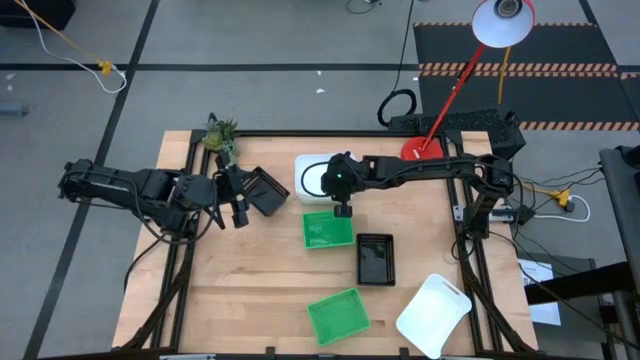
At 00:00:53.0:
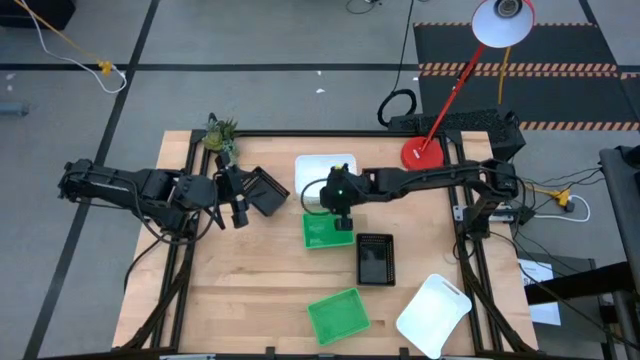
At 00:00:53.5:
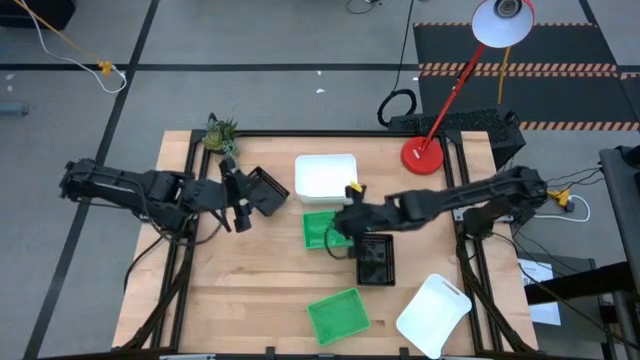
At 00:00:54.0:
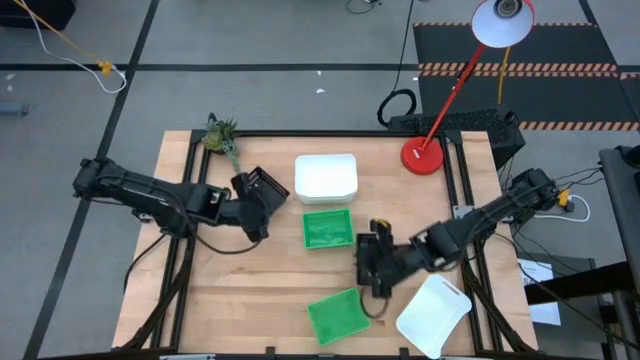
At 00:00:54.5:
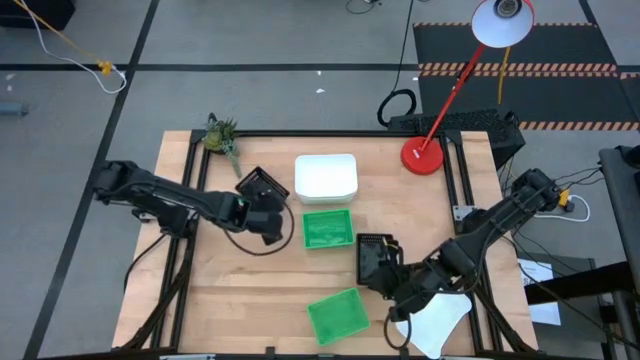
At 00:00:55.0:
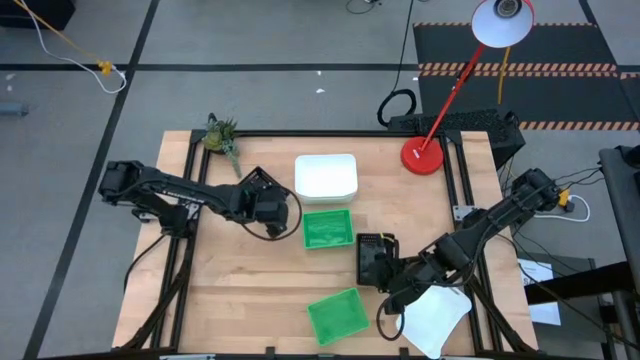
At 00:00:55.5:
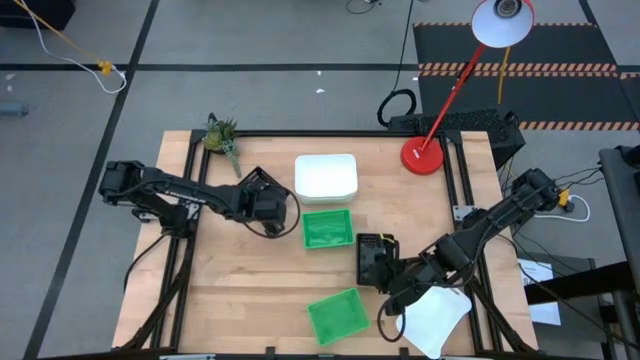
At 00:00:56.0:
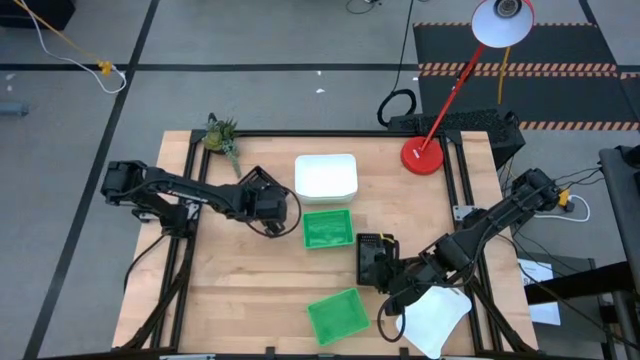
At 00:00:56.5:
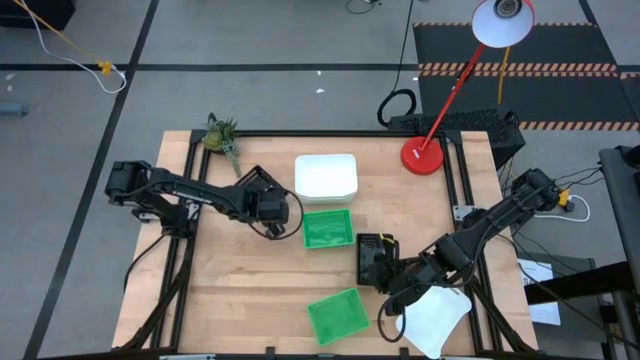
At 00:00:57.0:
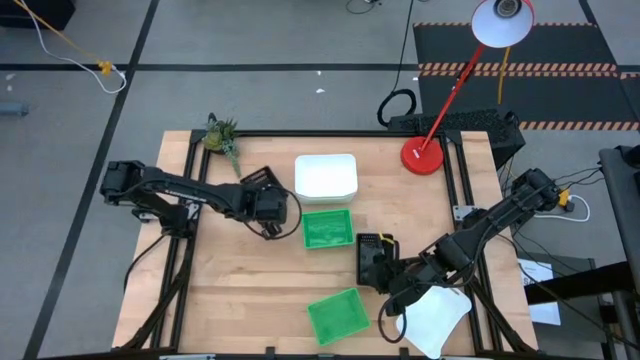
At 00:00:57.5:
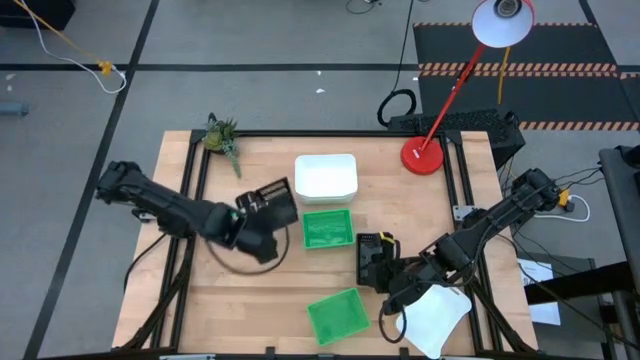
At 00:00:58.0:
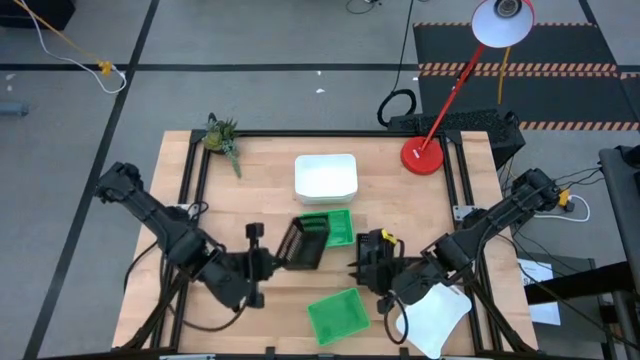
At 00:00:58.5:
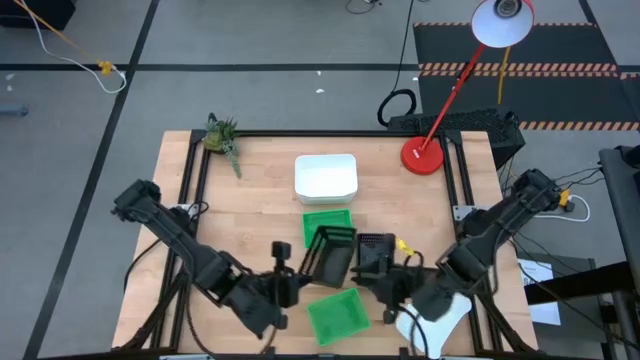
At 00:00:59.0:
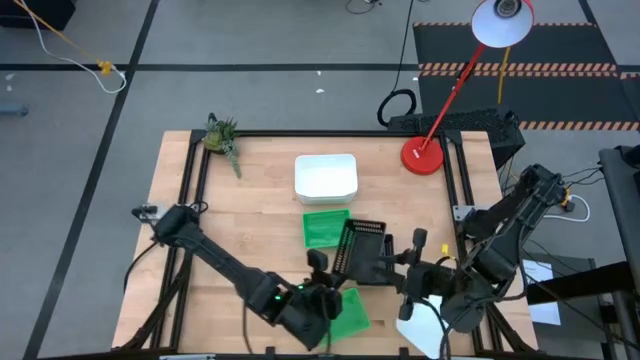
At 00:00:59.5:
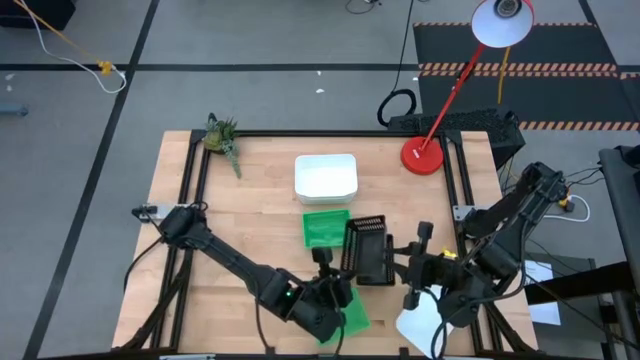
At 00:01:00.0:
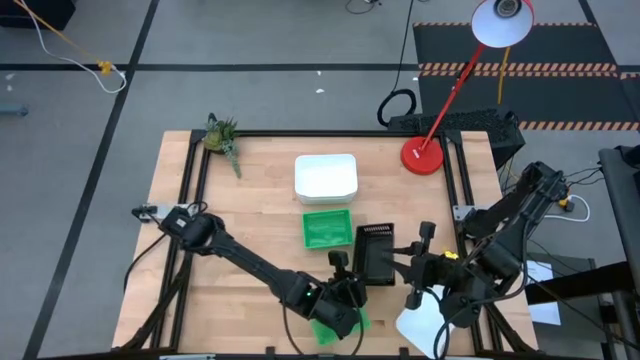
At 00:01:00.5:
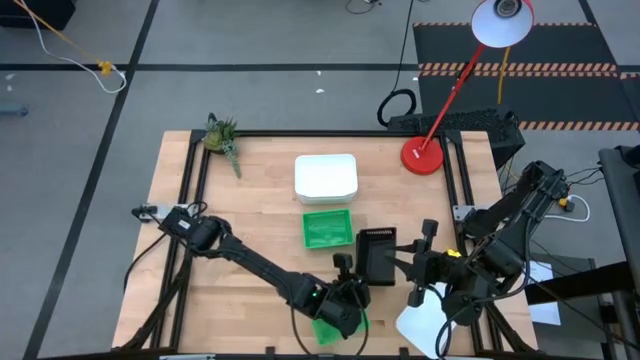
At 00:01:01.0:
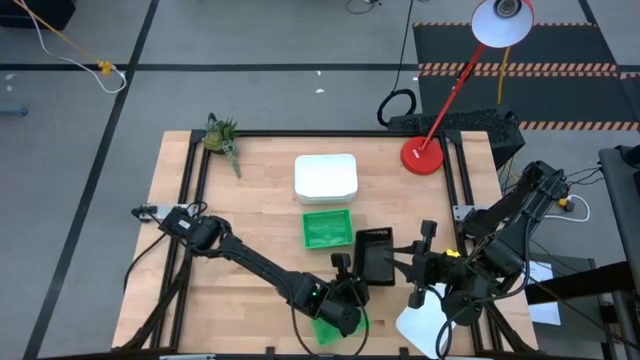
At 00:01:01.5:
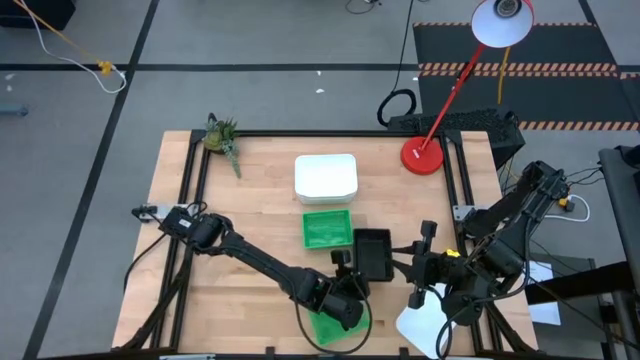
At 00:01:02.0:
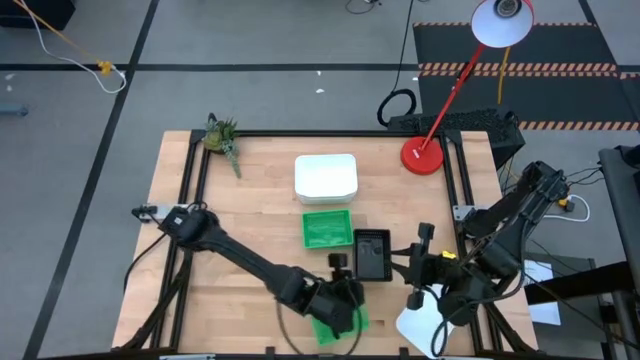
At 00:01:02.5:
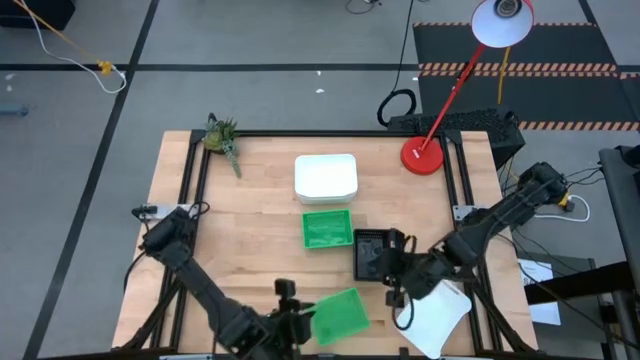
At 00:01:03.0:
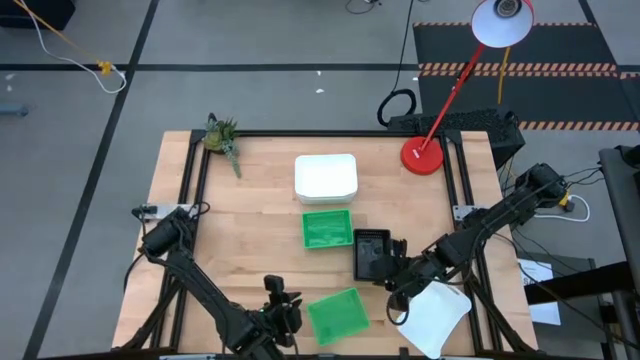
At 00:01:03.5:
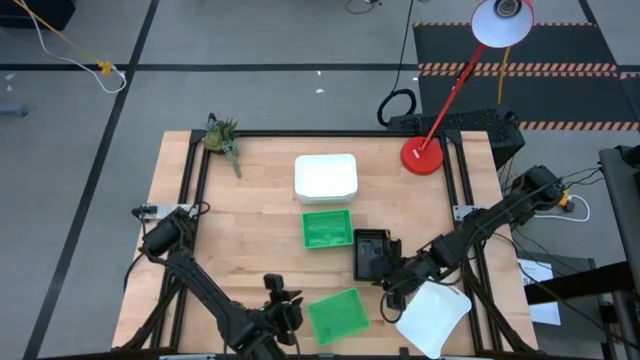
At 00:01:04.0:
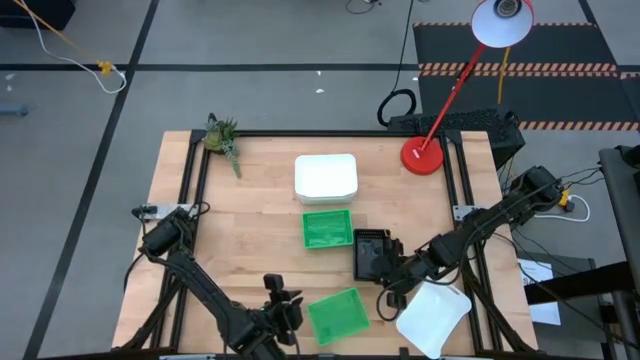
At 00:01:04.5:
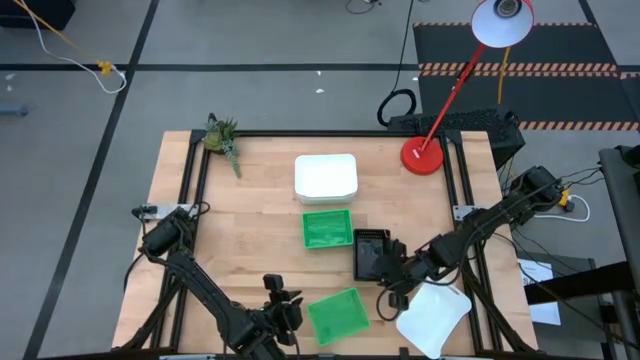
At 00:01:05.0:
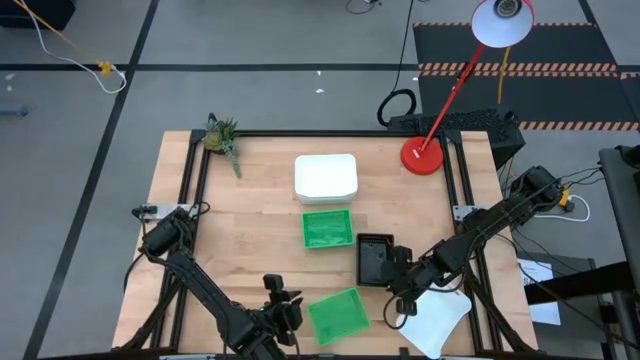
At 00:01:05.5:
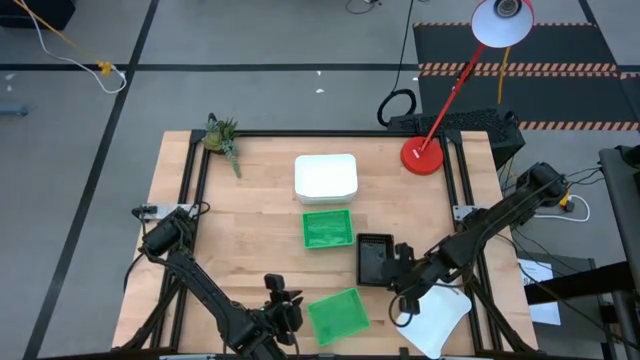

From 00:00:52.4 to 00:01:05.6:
Stack the top black bin on the bottom stacked black bins
